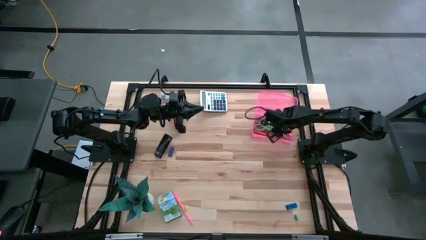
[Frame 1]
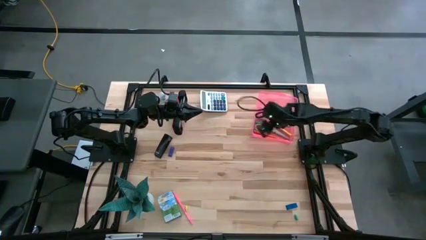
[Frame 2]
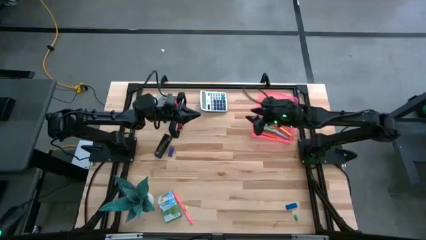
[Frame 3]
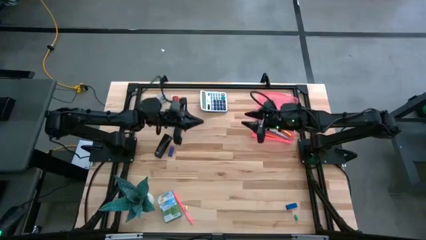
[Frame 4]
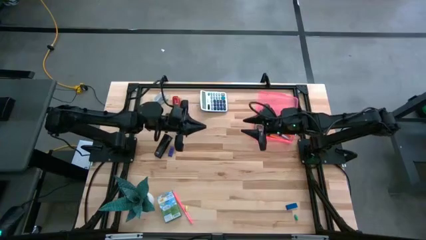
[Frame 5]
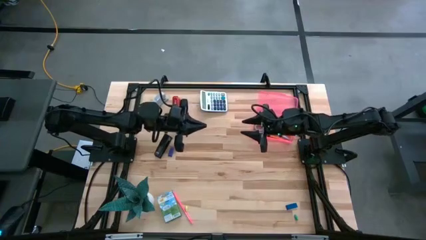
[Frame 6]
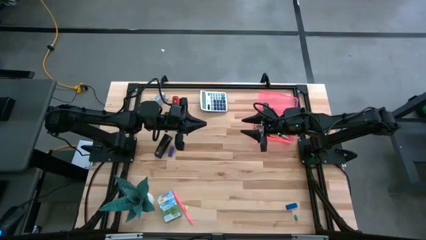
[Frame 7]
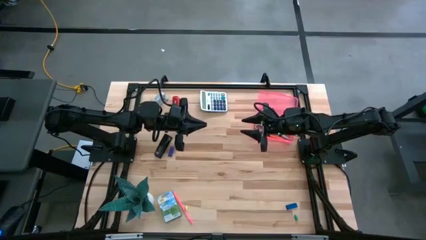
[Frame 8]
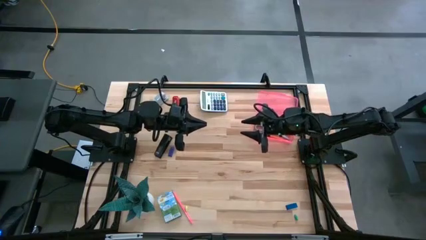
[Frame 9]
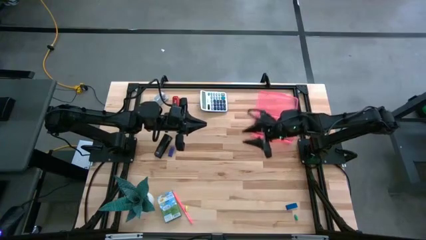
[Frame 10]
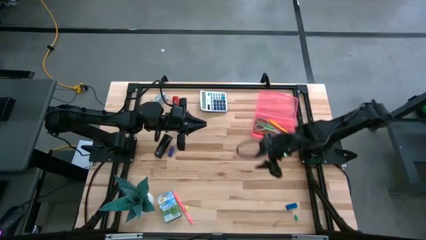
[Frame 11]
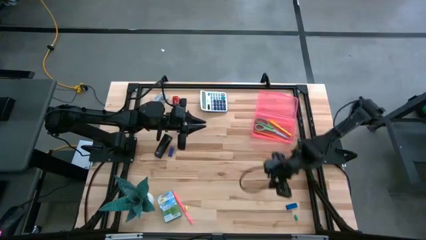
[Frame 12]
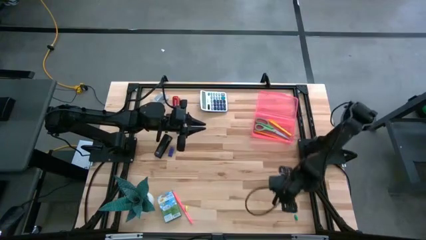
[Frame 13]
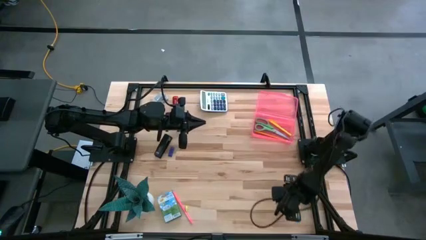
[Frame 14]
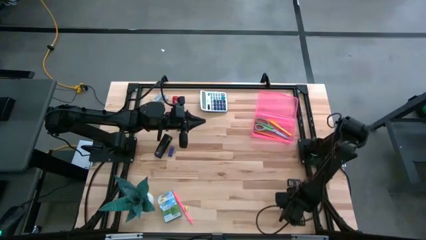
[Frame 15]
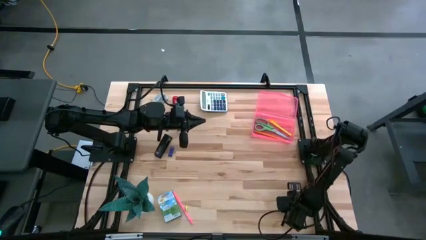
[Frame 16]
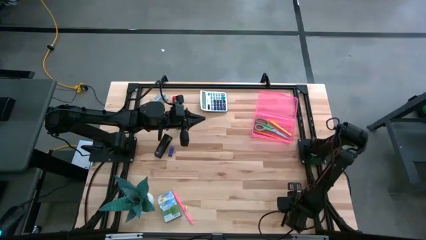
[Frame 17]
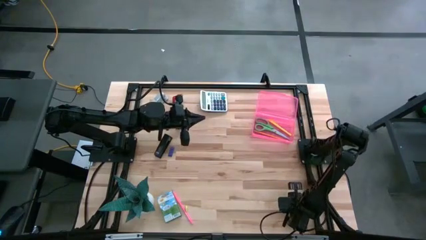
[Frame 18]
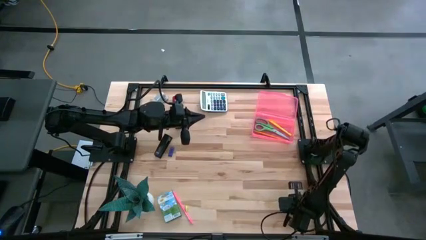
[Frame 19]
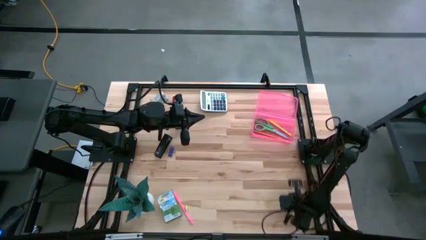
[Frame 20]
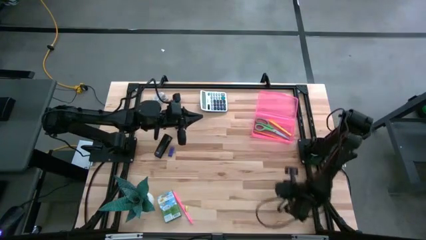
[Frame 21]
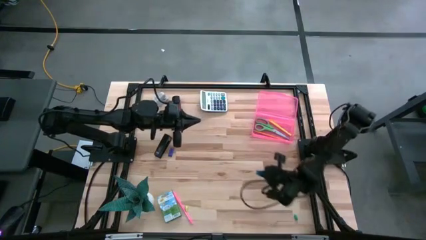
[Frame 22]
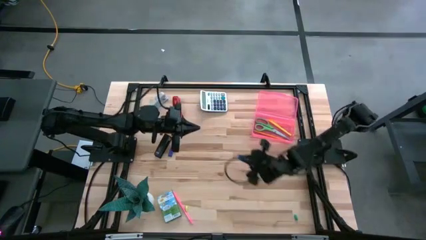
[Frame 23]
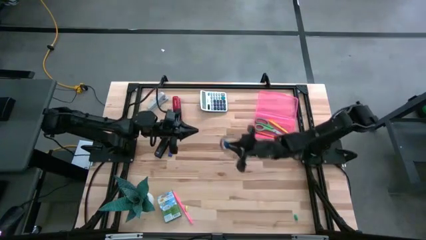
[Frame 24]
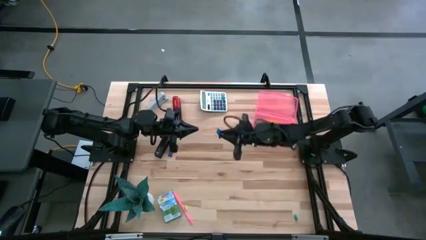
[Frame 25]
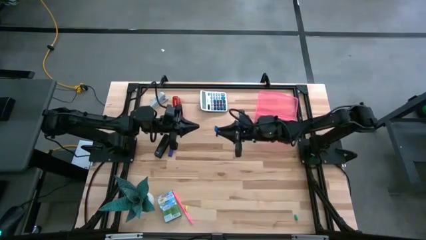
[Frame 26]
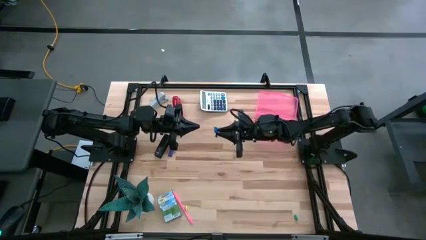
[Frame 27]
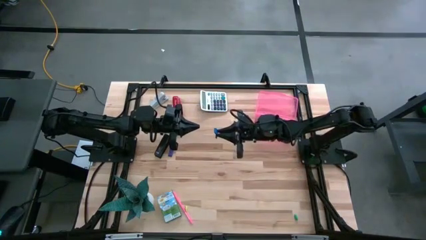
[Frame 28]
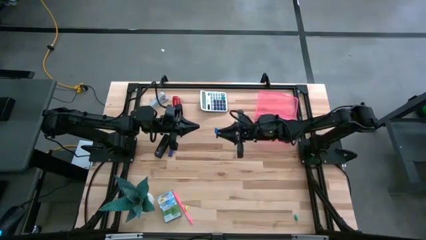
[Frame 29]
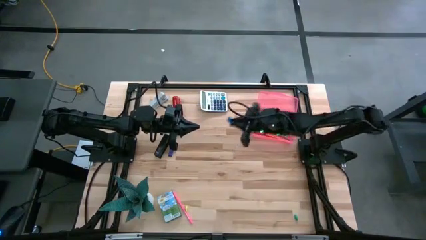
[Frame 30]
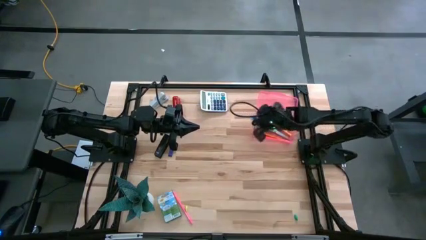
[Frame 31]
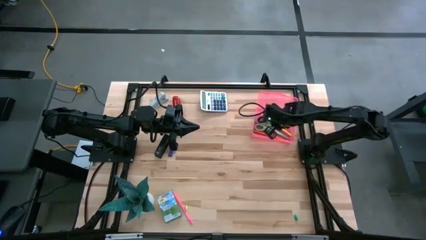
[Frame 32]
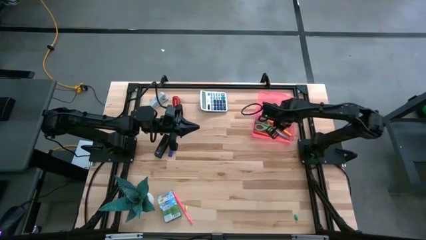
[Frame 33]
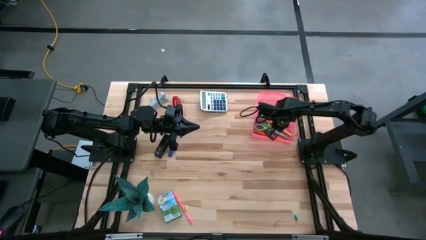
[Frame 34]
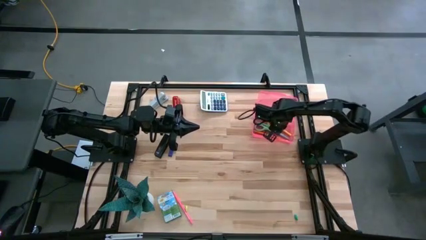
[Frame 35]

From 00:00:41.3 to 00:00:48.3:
Task: Pack school essentials
Put the bottom blue eraser into the pink supply box

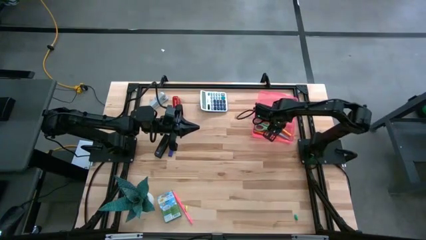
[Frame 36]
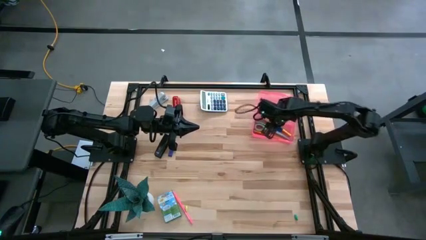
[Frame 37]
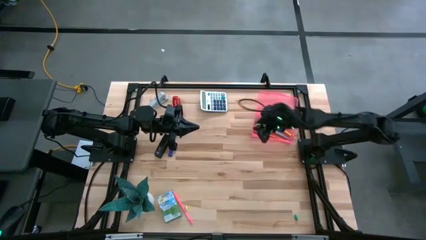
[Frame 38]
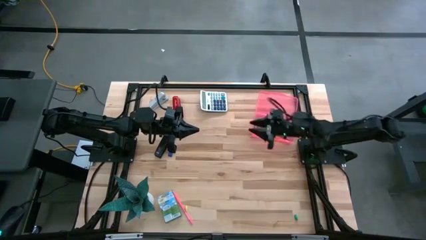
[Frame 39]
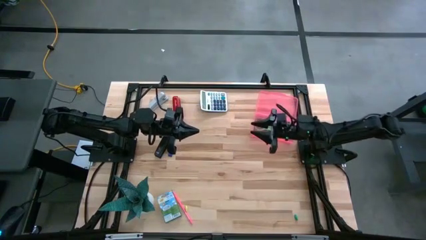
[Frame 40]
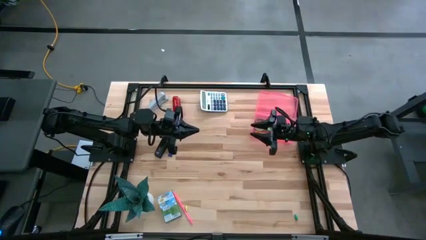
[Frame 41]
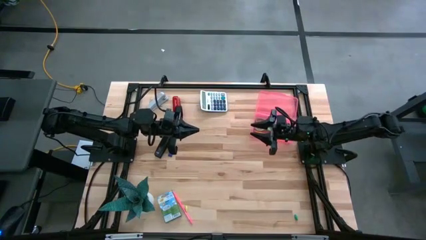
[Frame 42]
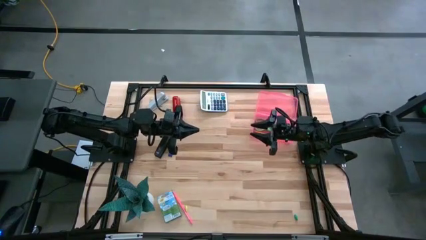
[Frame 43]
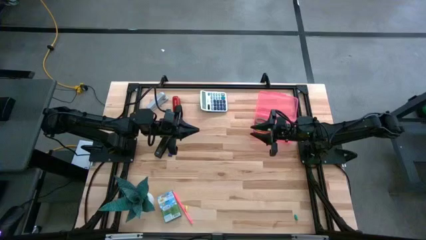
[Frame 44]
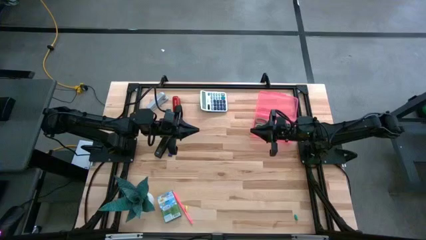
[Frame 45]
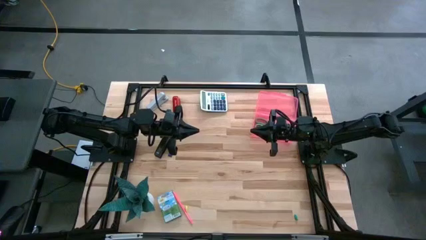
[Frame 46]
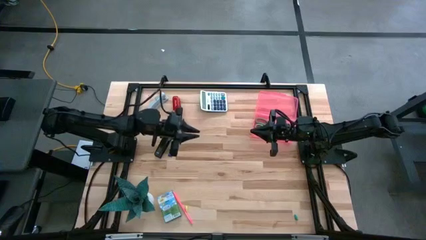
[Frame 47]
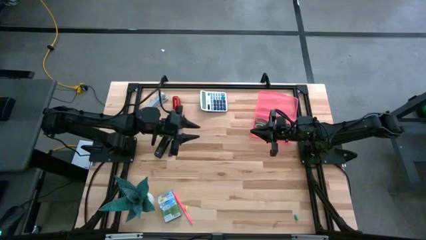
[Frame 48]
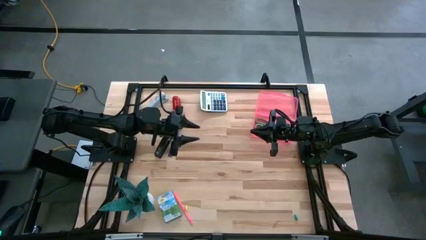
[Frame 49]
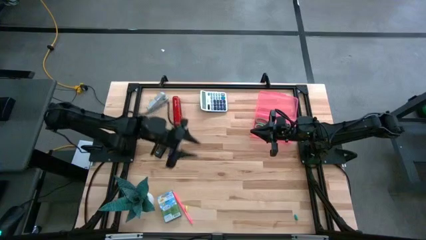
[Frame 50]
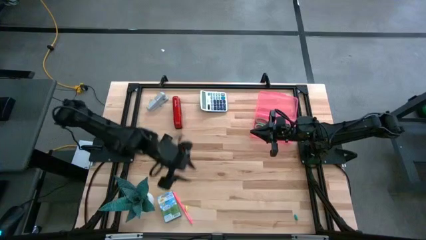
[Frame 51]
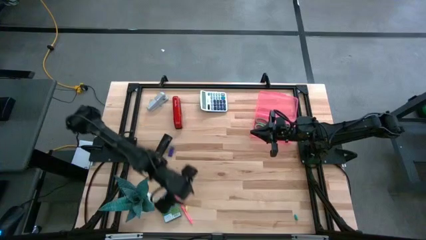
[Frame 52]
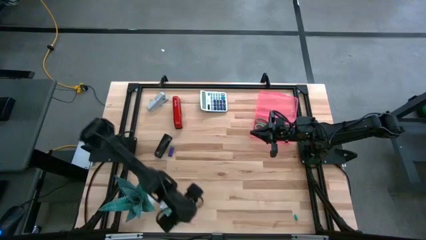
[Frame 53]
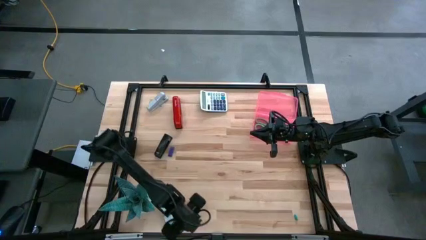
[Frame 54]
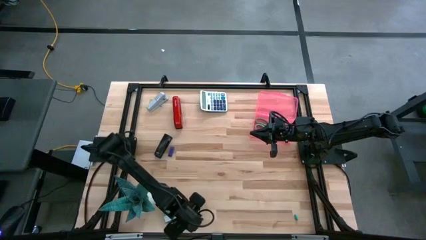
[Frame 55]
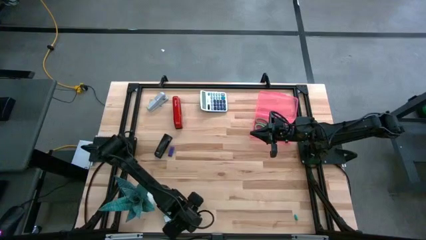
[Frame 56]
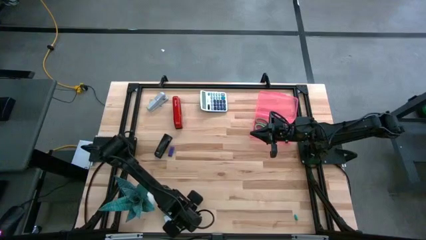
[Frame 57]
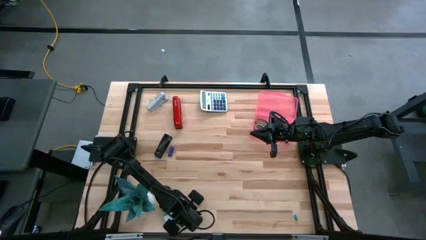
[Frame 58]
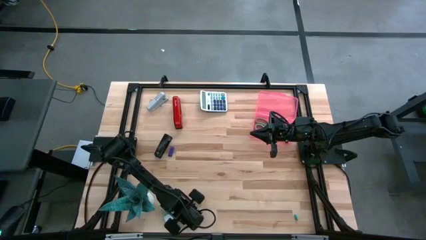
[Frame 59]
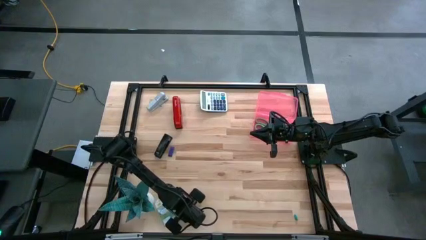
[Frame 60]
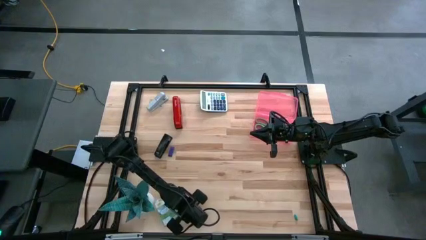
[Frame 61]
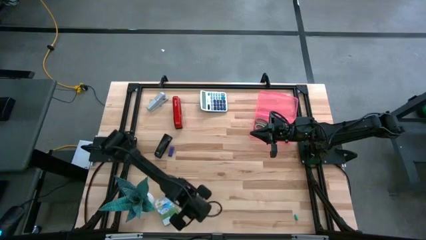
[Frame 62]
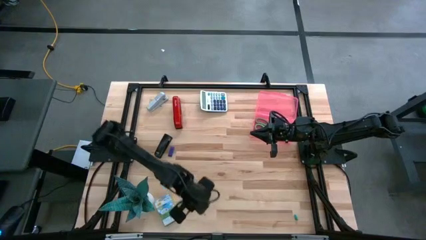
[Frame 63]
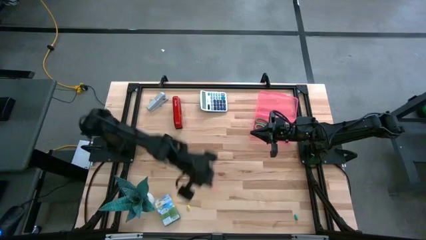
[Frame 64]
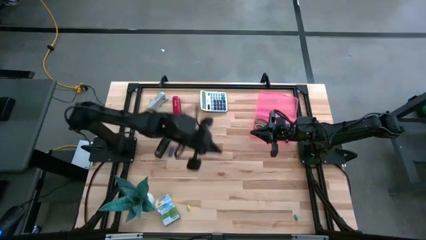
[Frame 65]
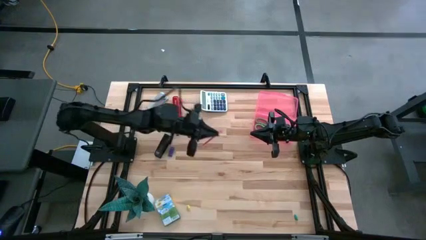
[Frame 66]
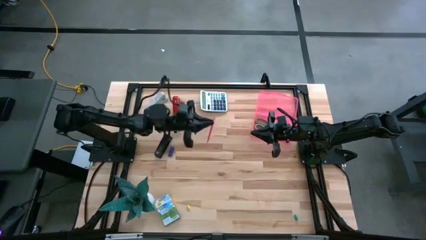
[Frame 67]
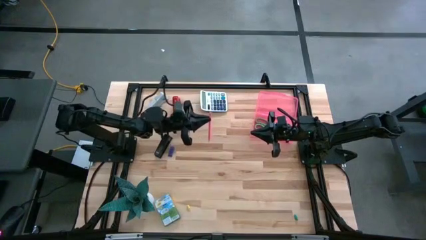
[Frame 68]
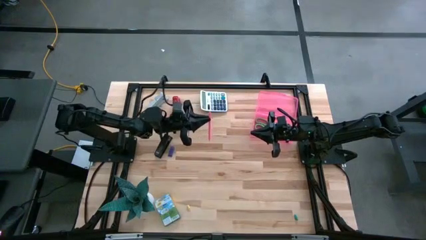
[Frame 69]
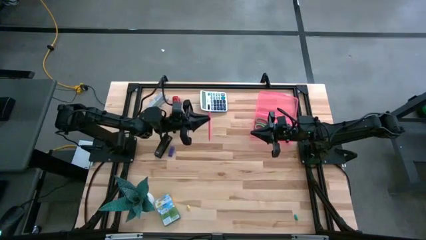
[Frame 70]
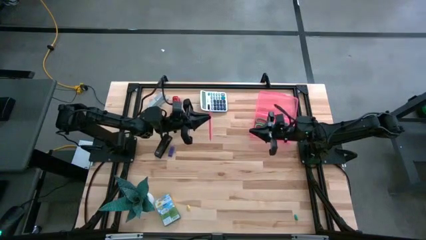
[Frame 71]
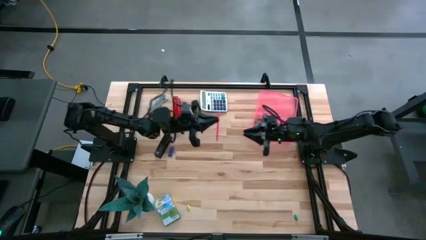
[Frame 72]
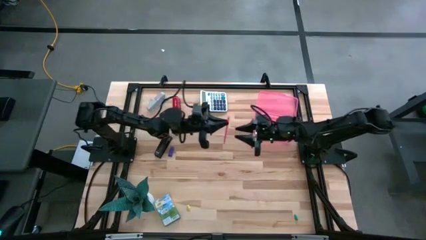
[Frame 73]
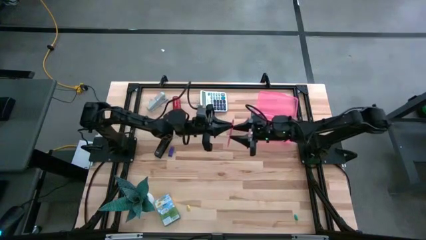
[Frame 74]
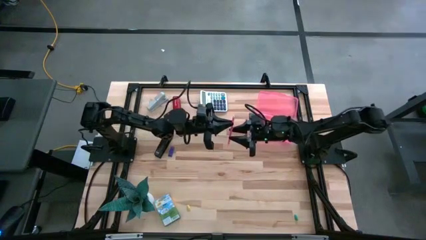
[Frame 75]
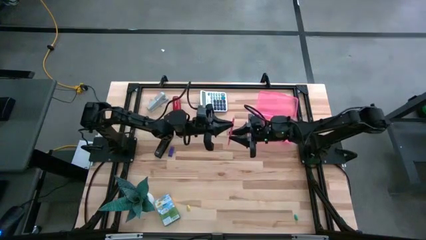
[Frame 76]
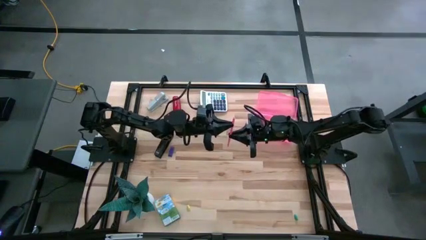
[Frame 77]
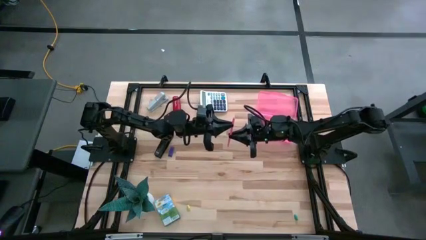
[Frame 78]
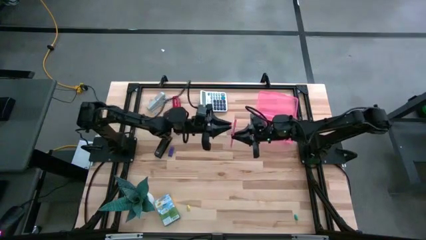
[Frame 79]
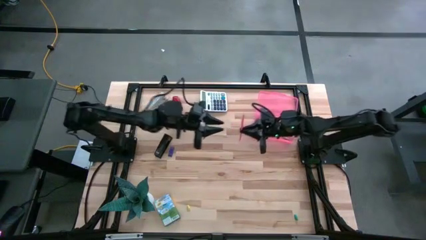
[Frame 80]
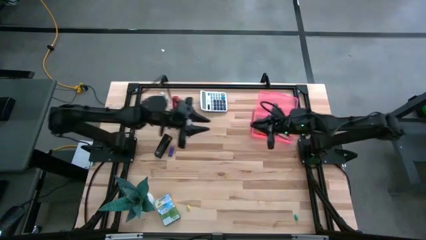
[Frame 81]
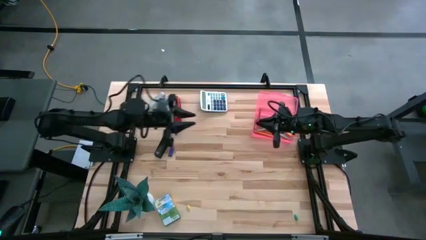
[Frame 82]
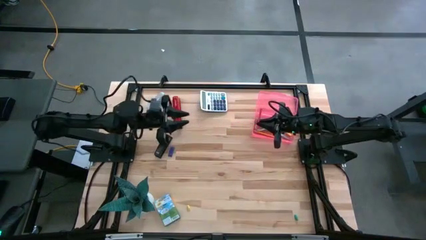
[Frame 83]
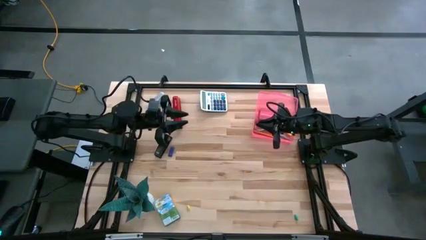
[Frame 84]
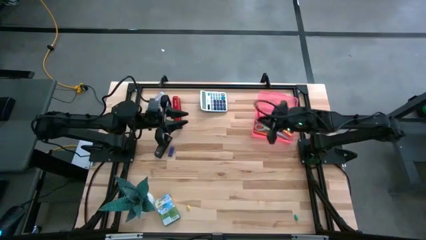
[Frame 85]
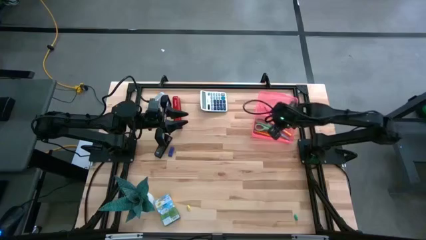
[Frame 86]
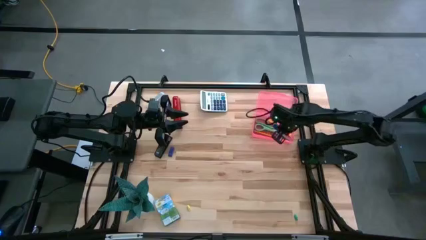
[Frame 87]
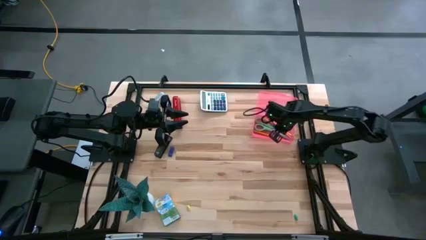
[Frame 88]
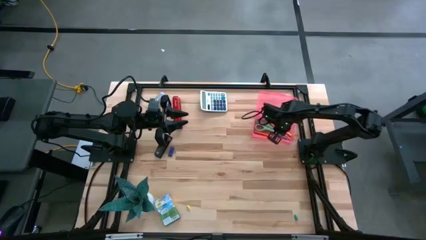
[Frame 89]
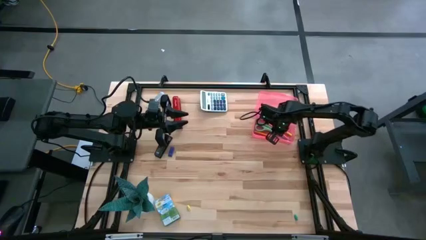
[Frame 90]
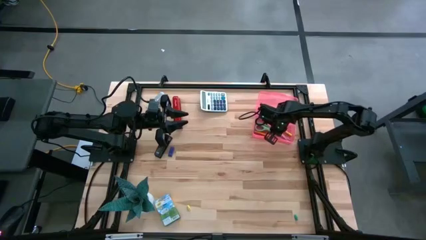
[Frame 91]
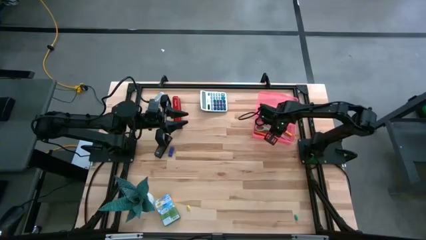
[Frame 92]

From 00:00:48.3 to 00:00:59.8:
Put the pink pencil into the pink supply box
